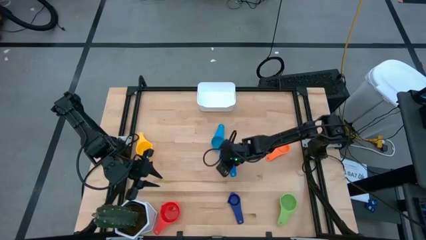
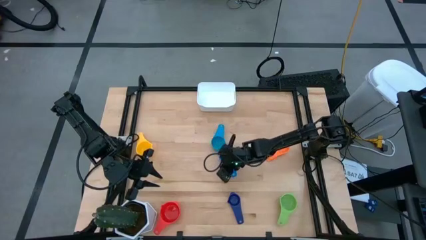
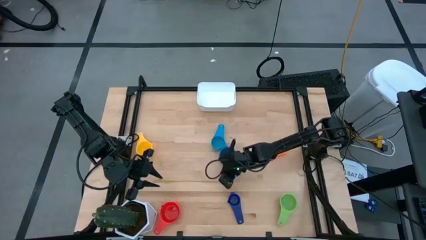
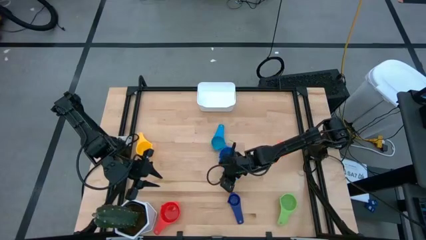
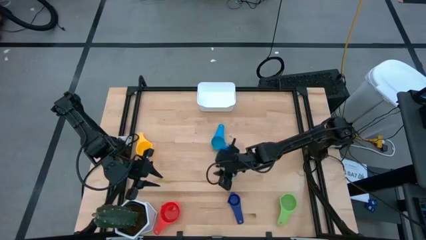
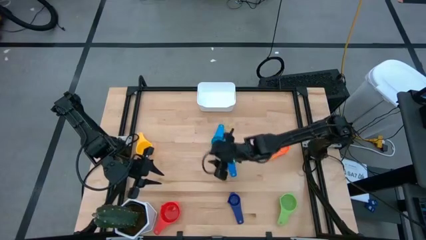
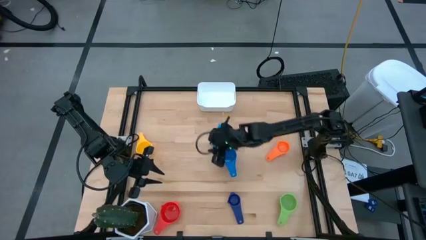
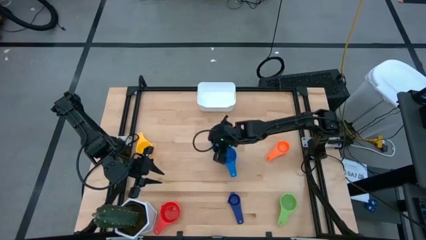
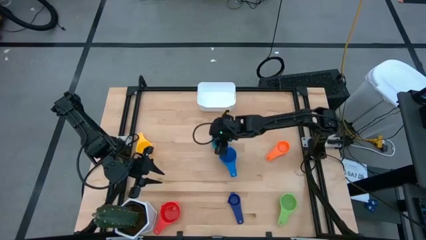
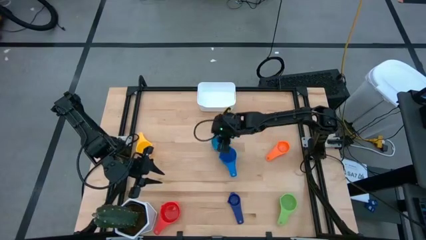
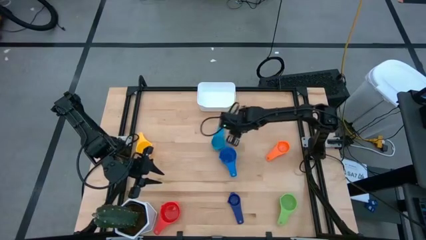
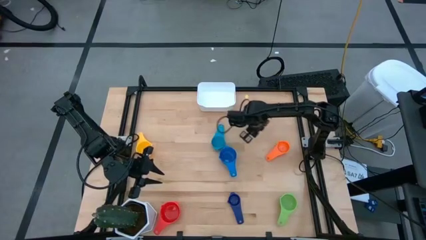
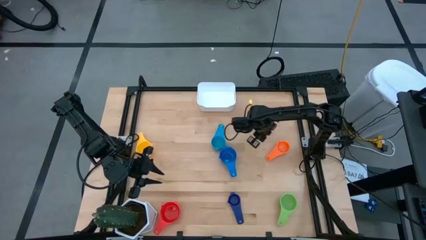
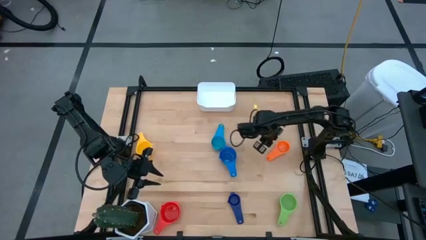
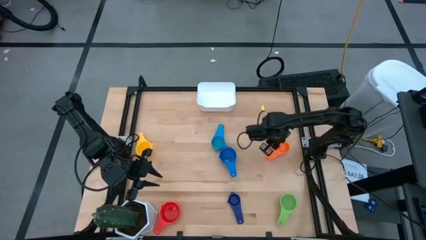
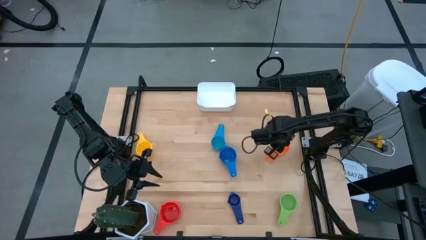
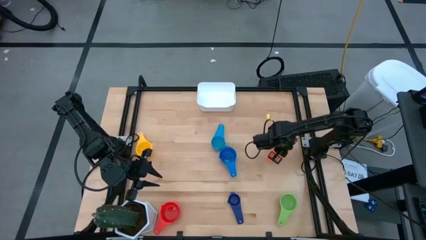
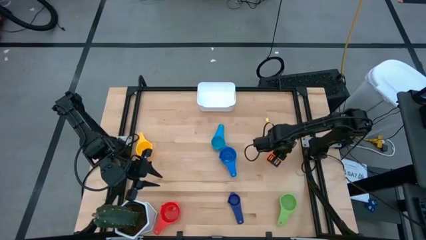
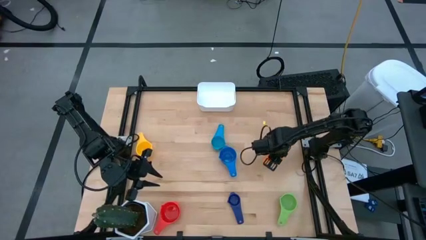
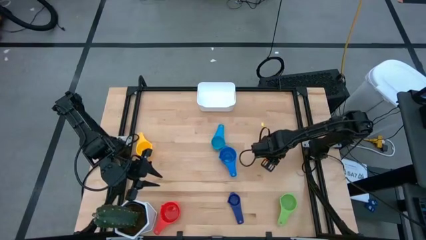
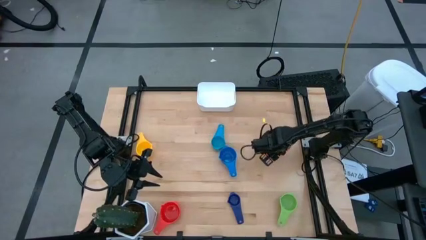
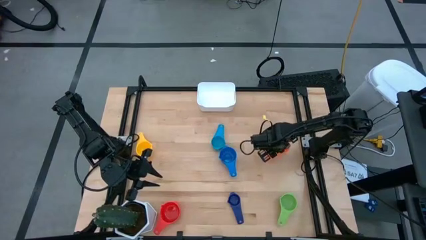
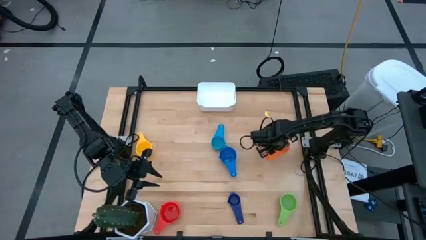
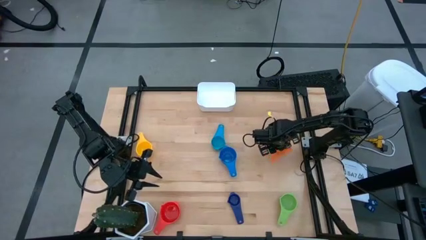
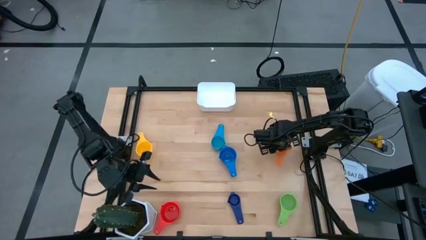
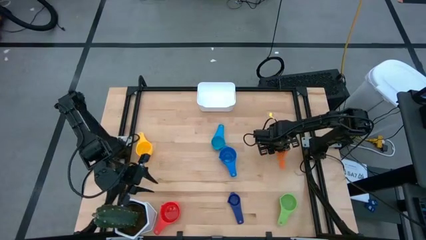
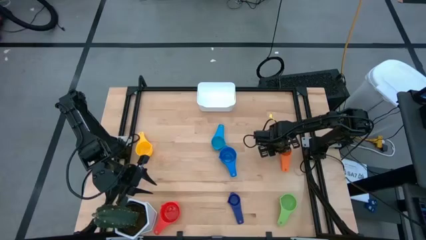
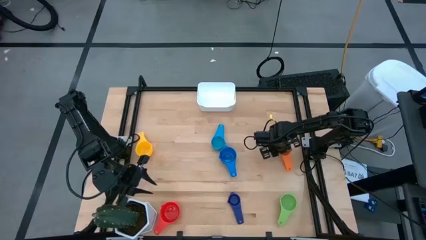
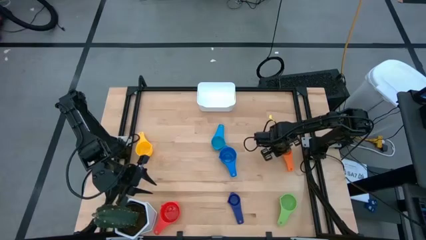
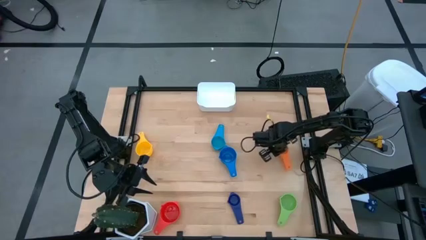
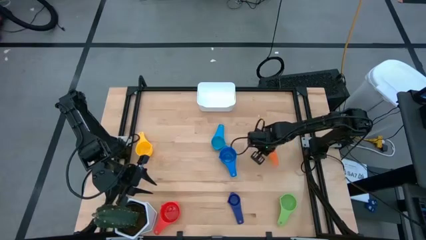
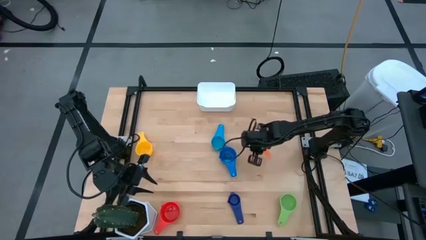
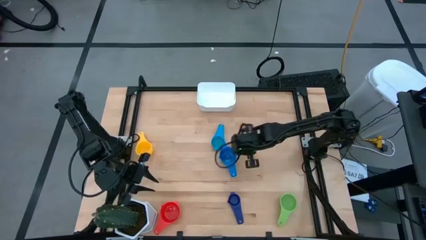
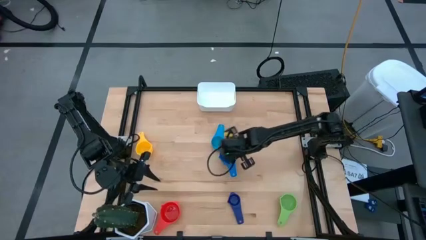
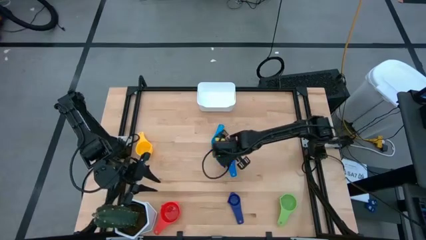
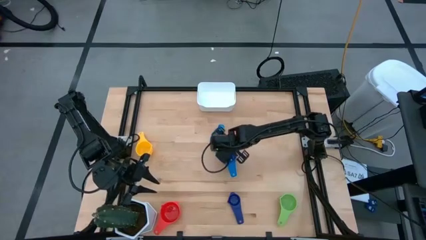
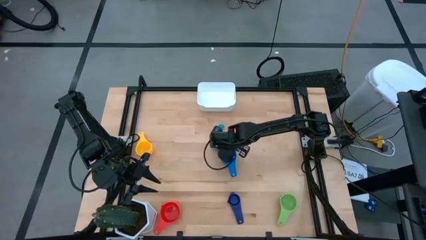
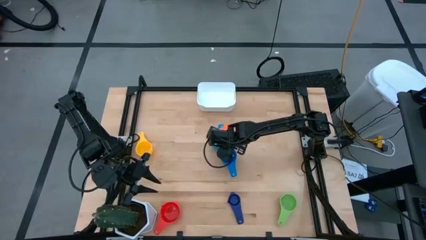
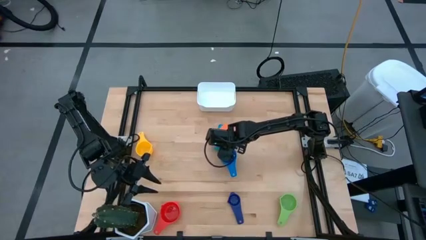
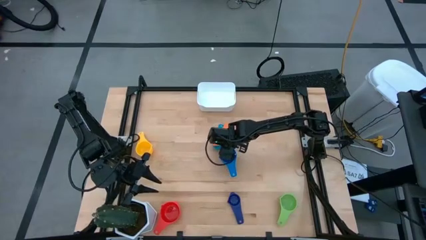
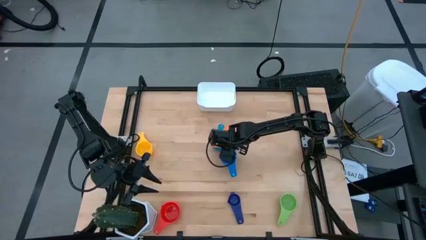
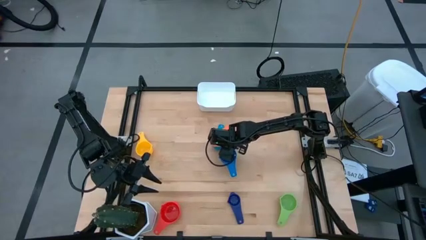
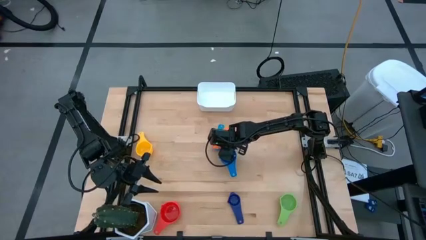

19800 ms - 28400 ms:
Task: Nest measuring cups in basket
Stack the orange measuring cup on top of the light blue measuring cup

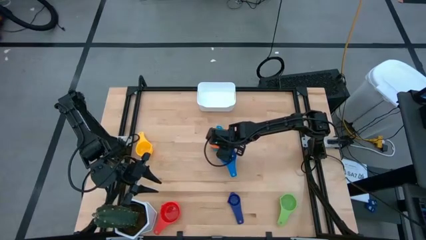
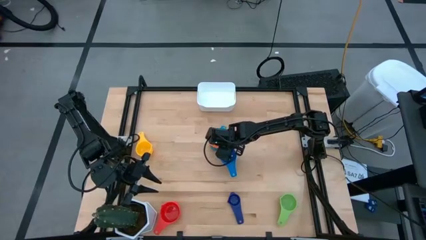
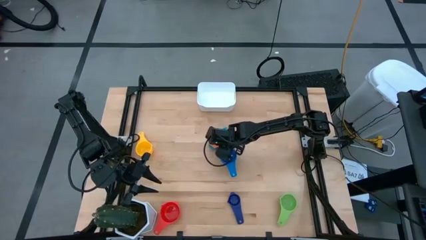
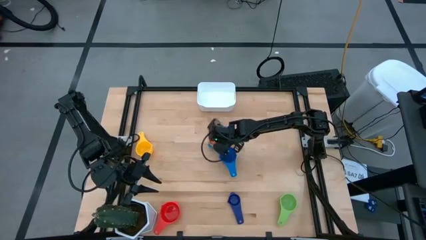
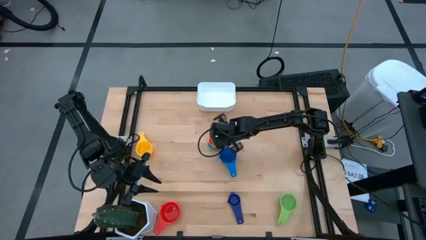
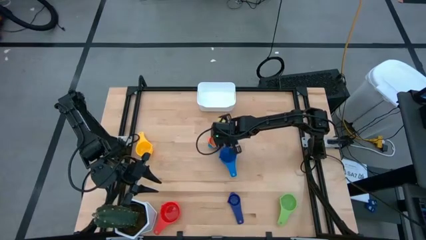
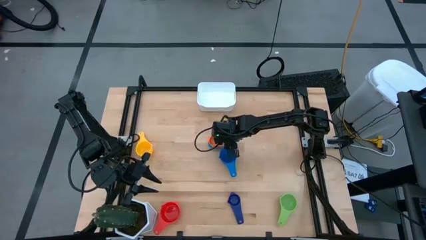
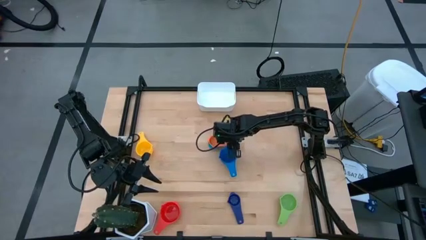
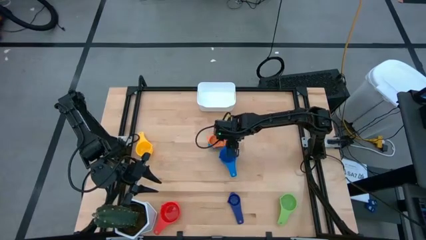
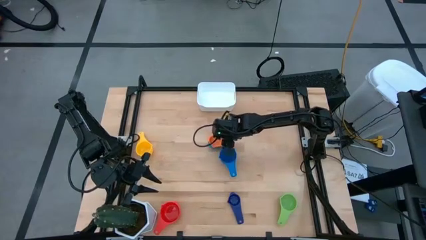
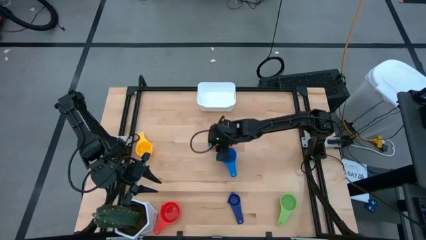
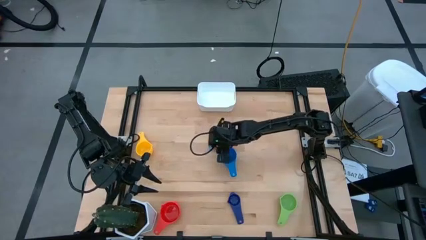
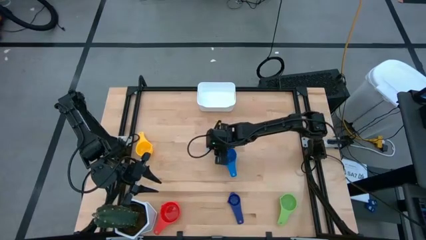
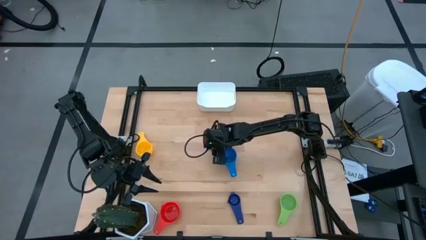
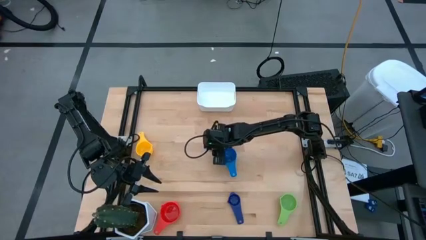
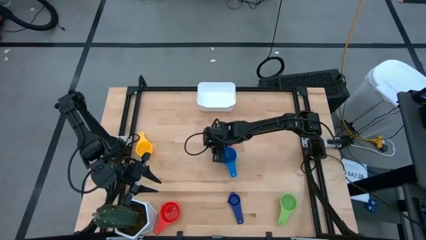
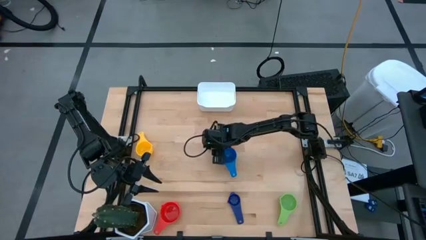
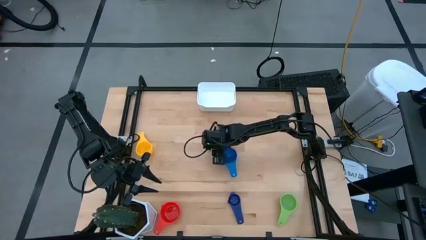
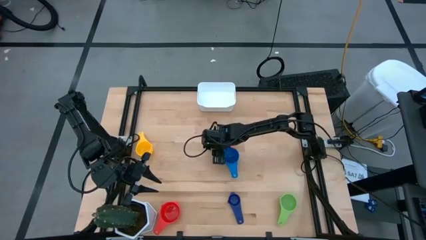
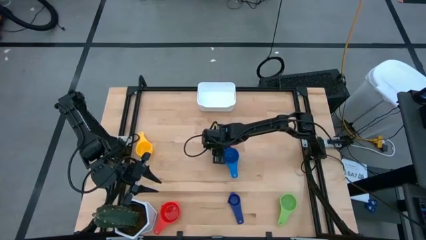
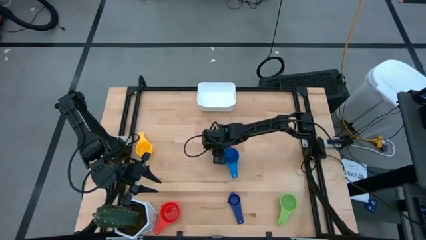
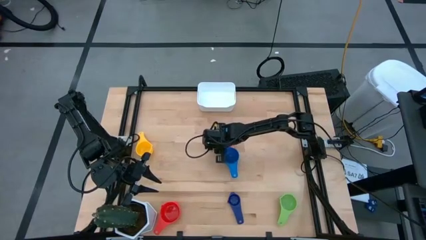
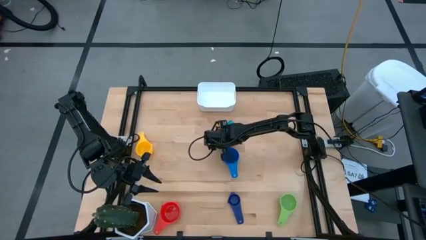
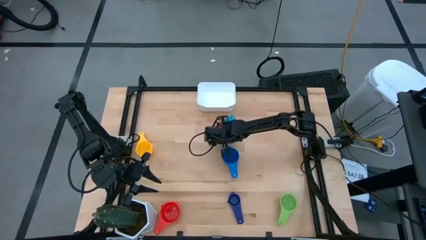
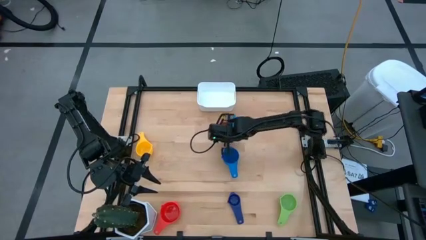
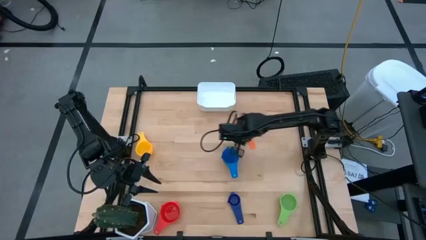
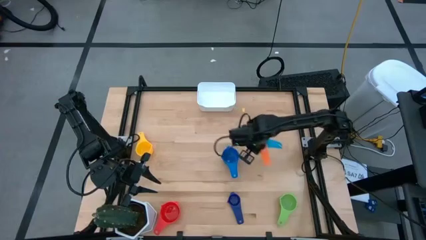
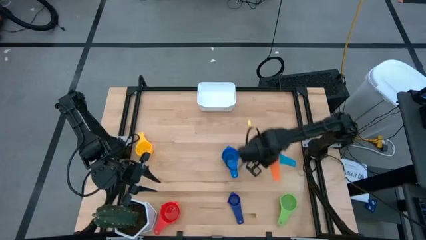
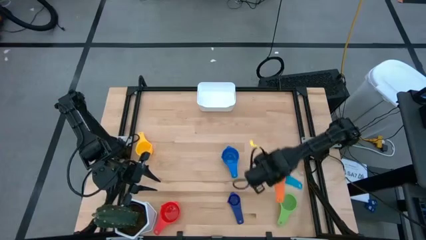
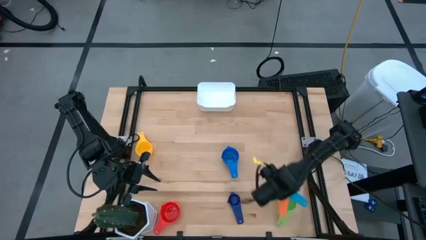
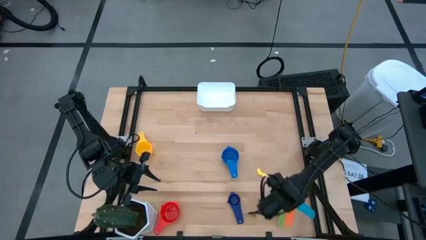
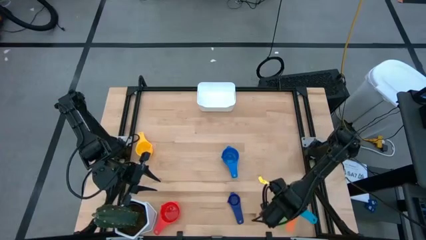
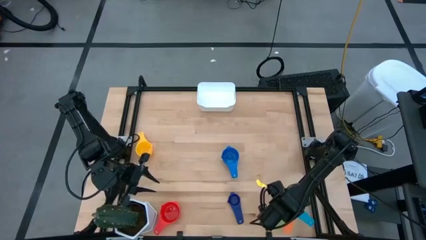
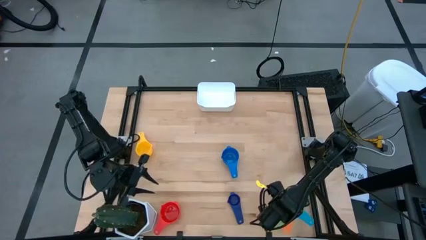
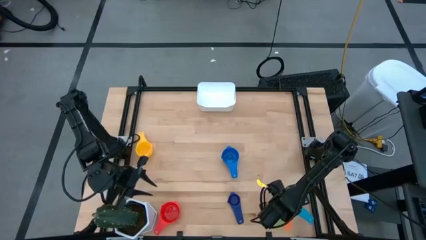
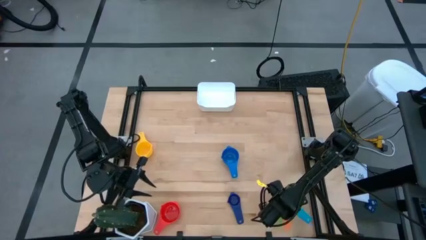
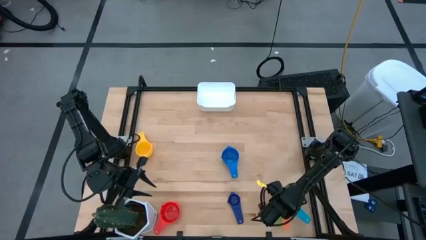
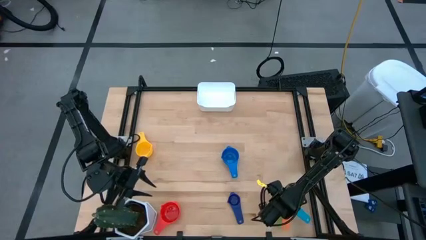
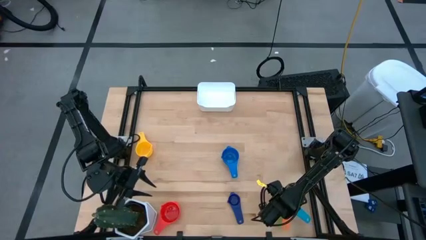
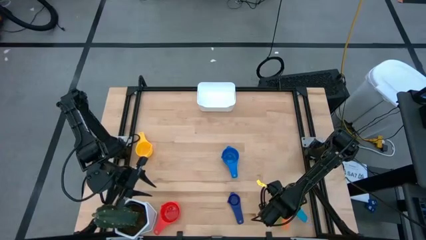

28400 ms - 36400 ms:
Stack the nested measuring cups on top of the green measuring cup
